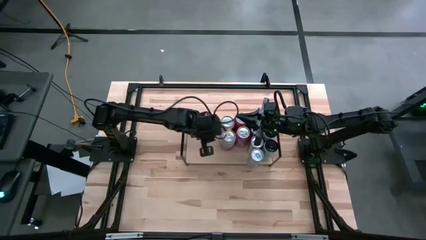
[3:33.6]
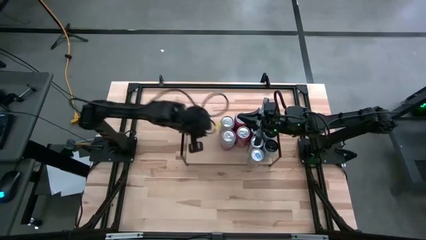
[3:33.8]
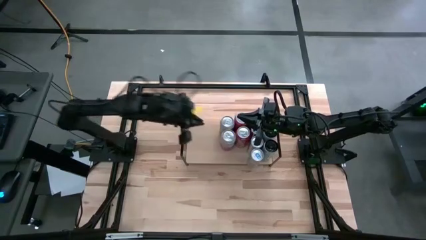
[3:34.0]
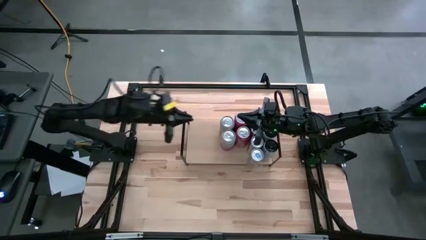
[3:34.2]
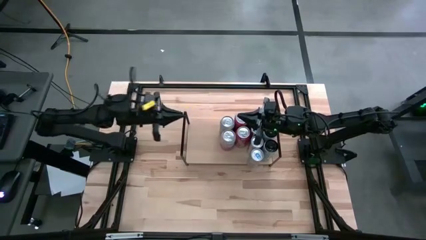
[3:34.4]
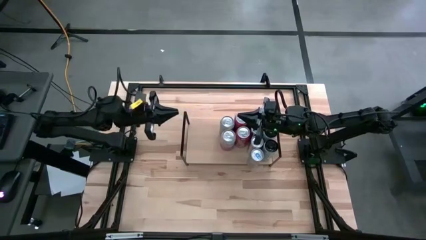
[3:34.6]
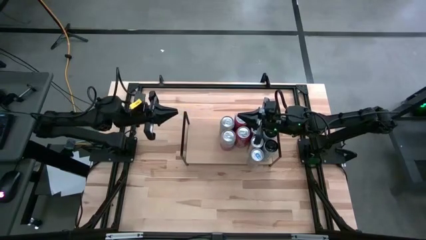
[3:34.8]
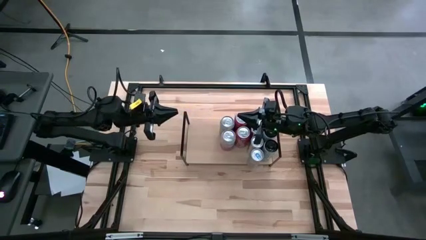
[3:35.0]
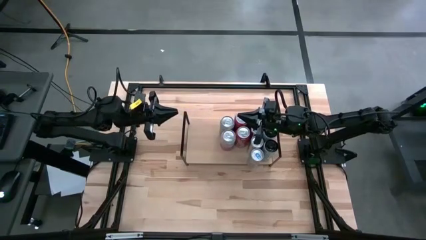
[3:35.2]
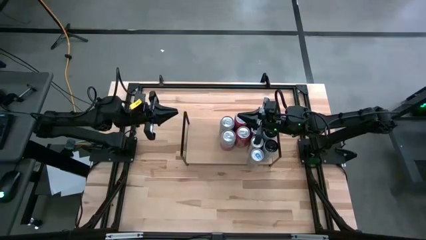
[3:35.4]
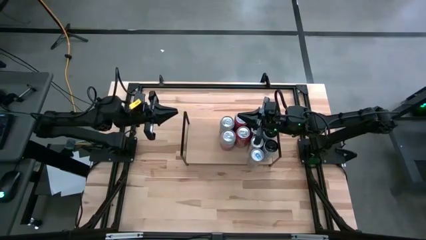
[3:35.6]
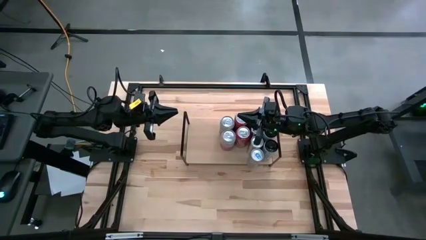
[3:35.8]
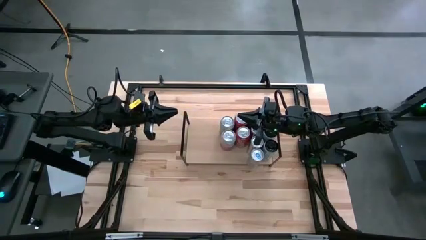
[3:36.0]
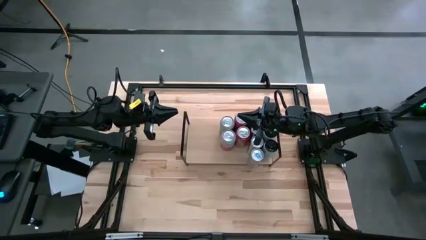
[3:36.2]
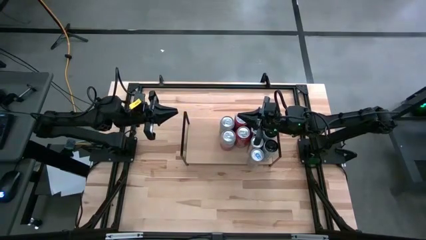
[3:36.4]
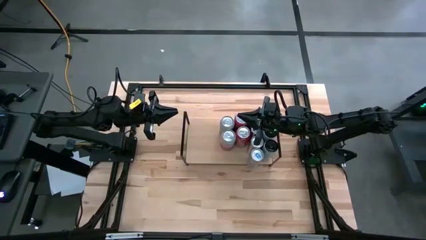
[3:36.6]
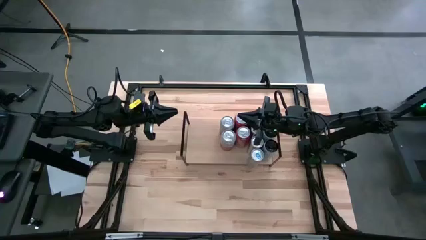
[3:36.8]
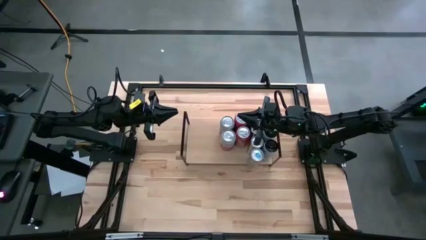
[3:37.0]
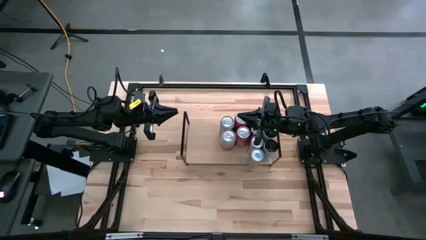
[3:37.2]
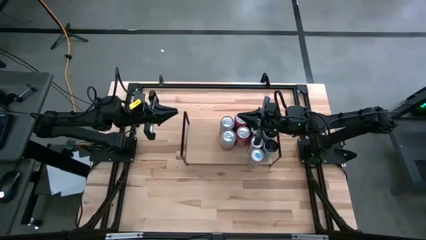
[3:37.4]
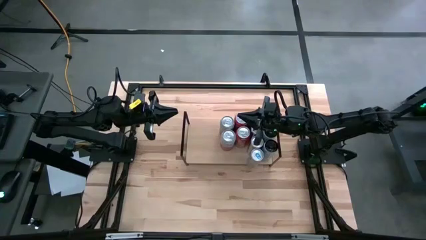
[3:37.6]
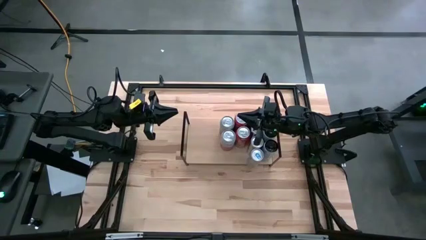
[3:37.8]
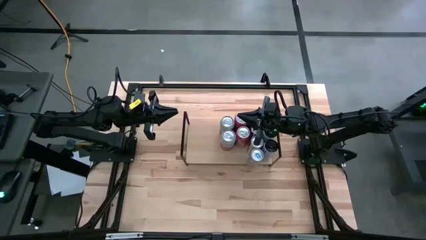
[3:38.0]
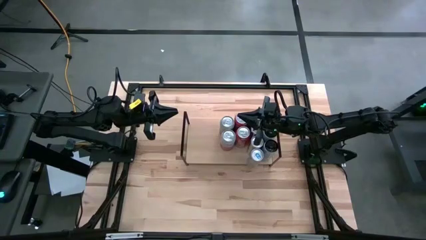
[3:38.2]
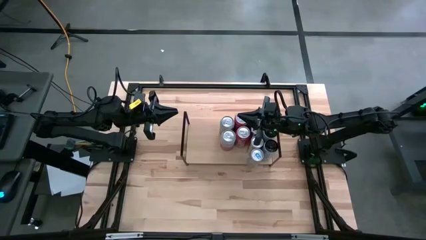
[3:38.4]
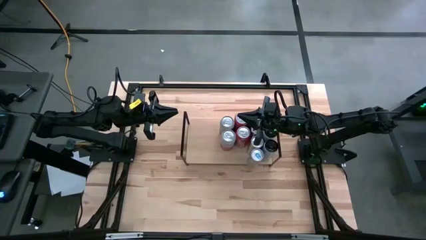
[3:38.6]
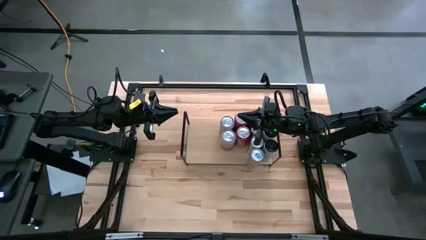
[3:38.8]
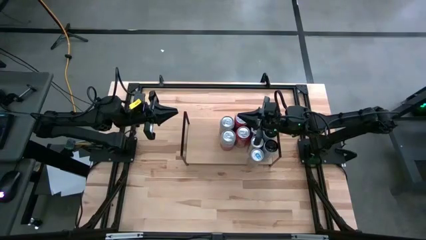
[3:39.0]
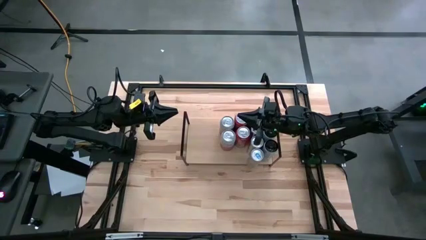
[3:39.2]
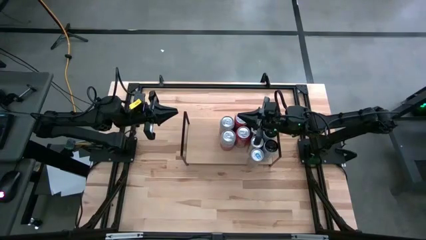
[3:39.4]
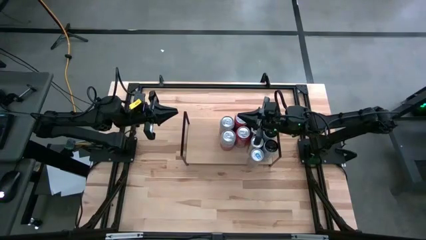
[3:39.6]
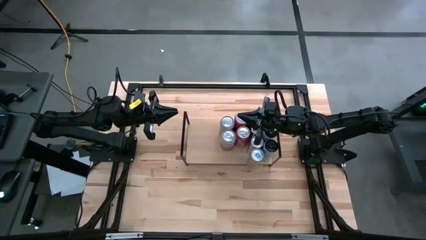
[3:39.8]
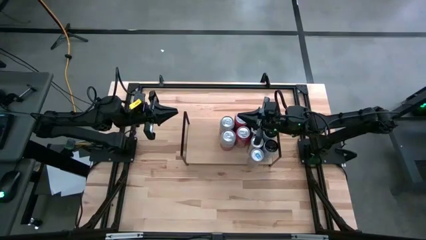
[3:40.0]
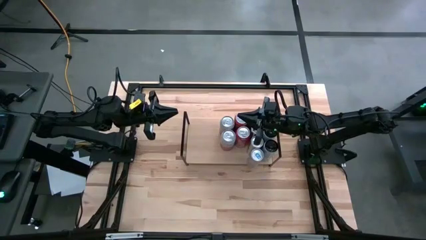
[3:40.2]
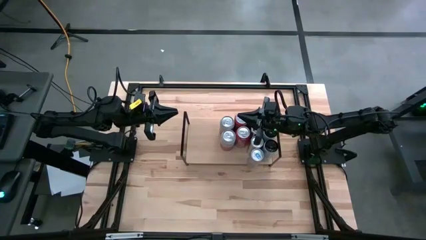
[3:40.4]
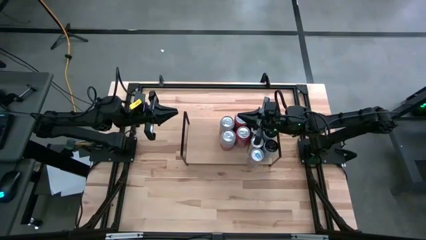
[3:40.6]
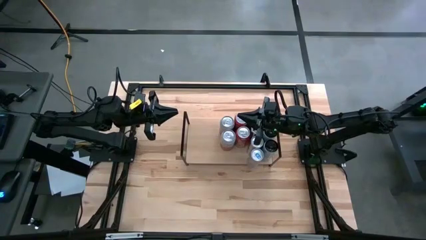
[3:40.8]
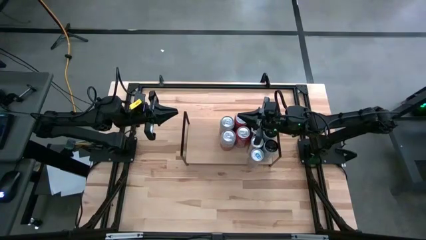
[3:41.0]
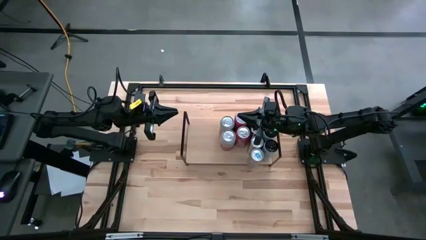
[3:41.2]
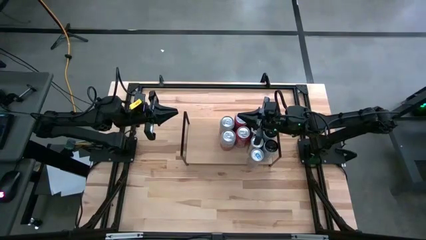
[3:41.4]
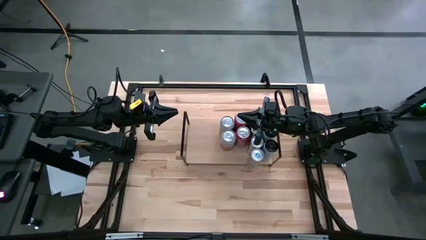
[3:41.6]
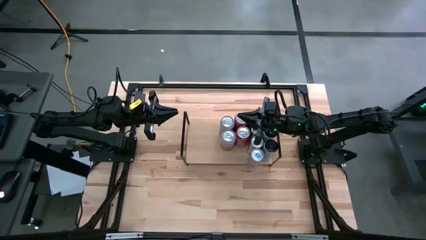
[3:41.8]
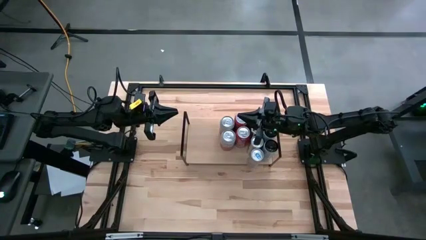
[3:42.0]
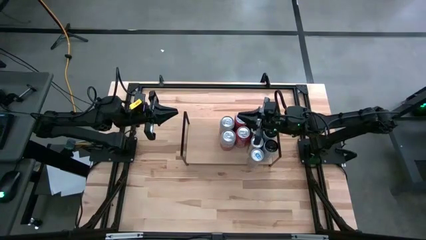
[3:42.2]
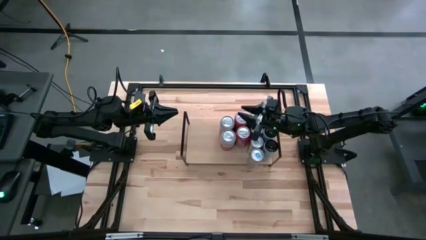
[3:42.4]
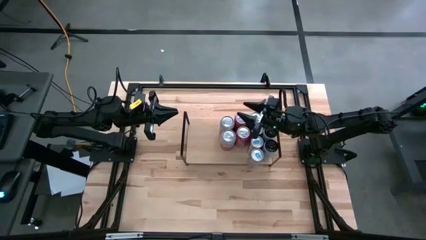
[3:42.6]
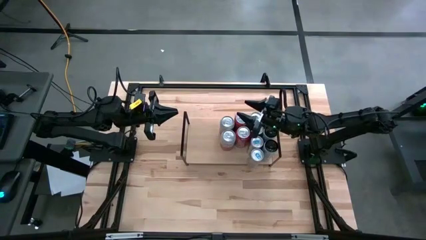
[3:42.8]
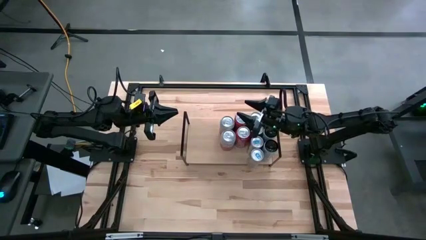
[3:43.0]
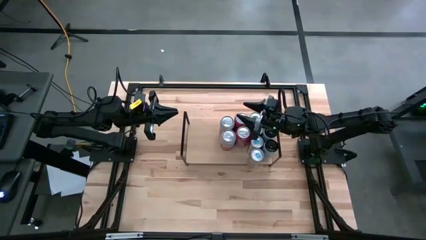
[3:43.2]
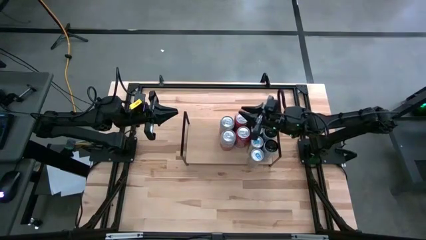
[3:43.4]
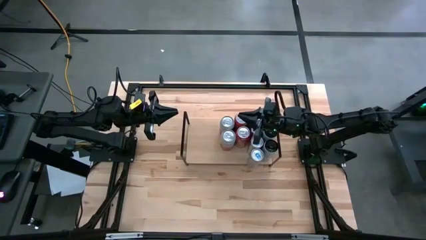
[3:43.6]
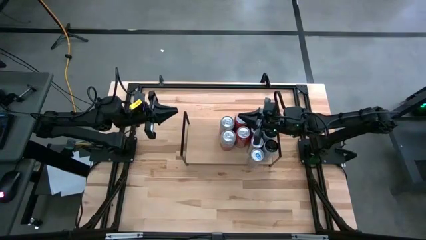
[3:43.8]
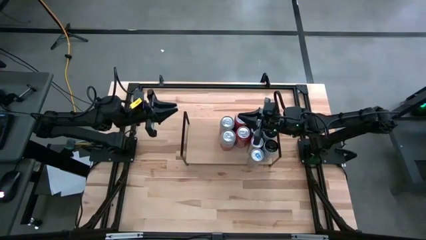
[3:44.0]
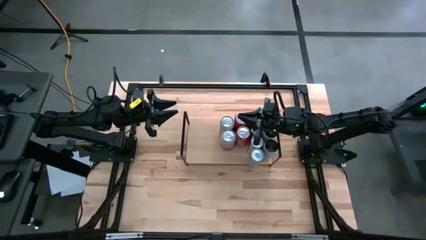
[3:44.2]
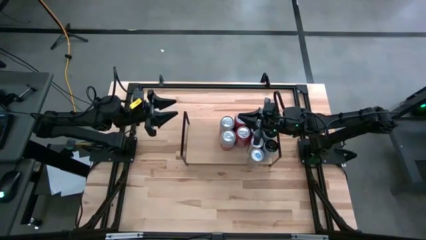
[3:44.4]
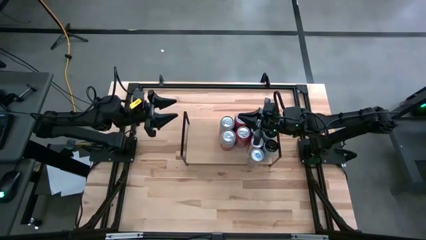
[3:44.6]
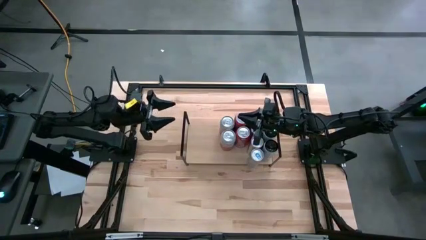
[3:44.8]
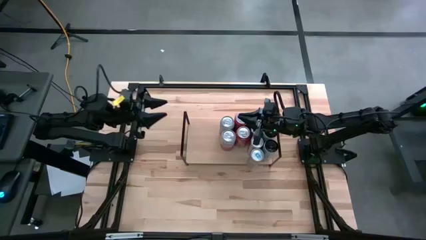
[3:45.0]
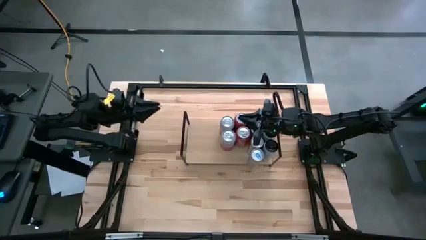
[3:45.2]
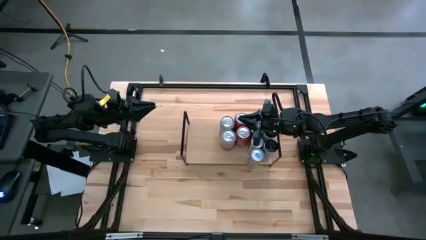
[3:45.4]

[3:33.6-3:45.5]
Task: Place canned beverage on shelf
Return to Home Position

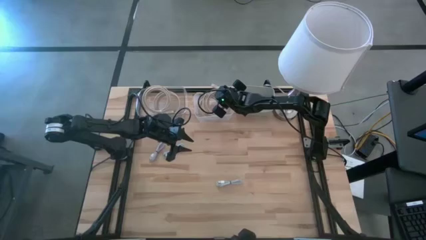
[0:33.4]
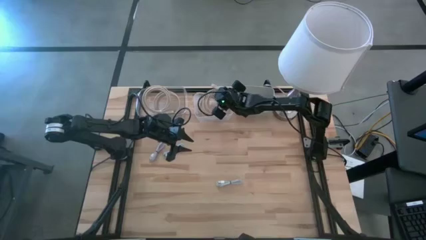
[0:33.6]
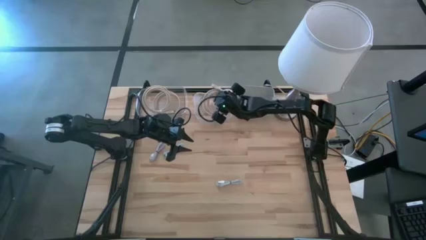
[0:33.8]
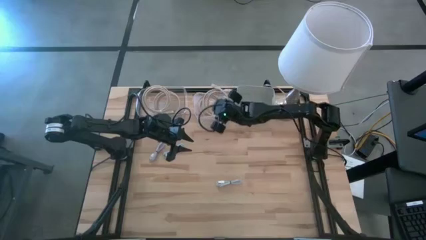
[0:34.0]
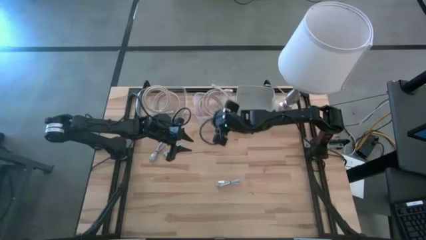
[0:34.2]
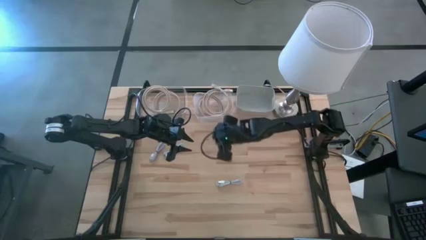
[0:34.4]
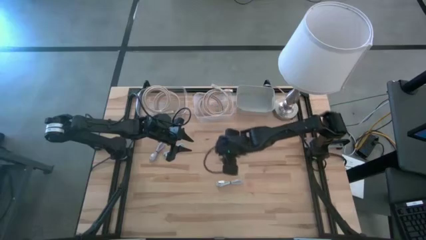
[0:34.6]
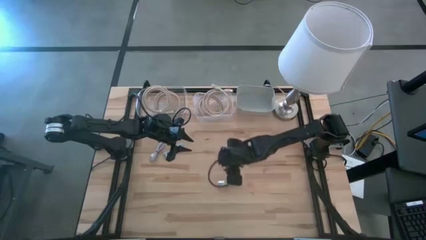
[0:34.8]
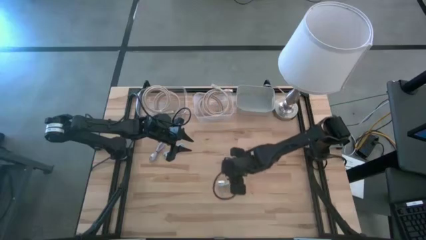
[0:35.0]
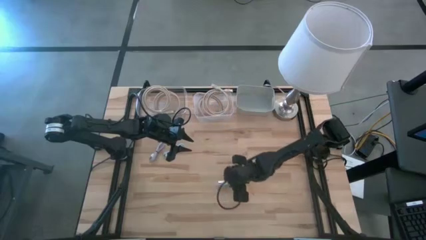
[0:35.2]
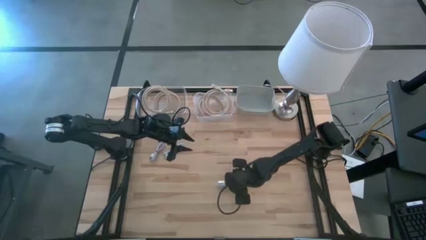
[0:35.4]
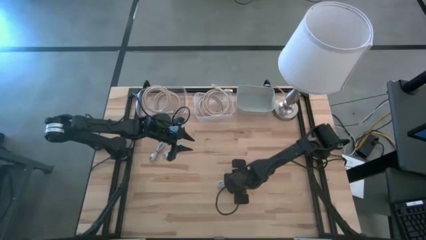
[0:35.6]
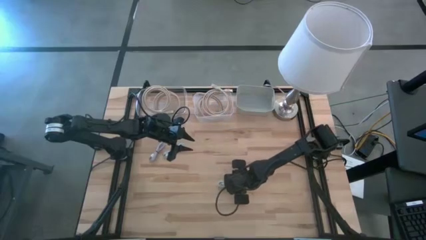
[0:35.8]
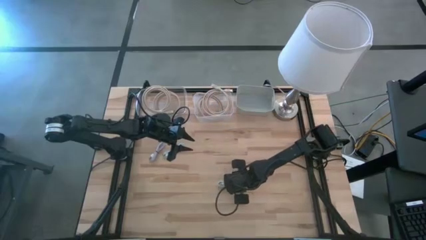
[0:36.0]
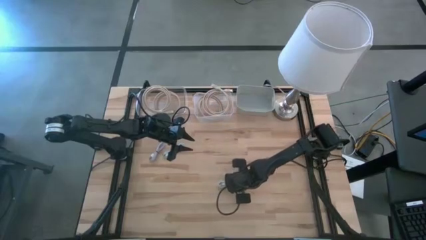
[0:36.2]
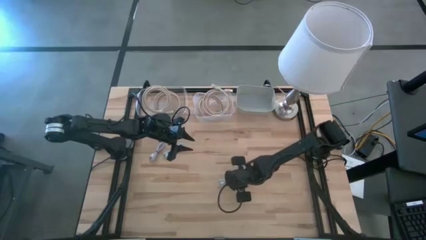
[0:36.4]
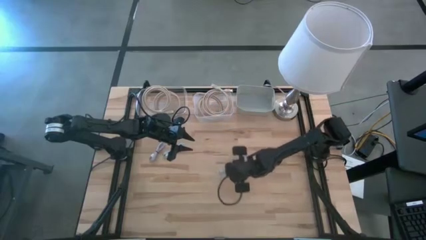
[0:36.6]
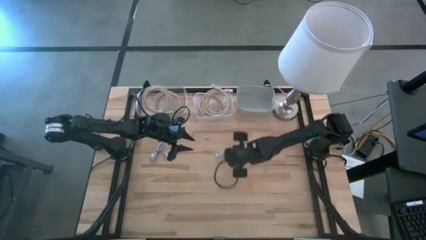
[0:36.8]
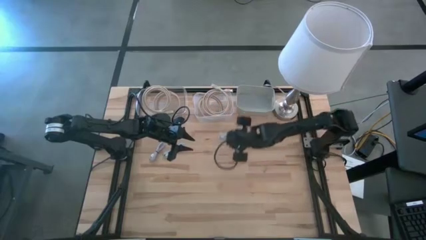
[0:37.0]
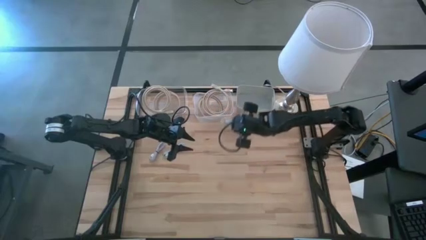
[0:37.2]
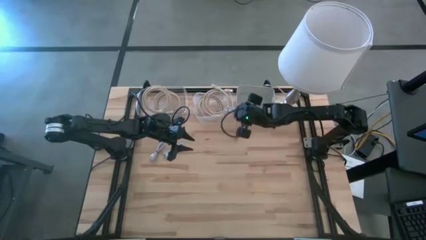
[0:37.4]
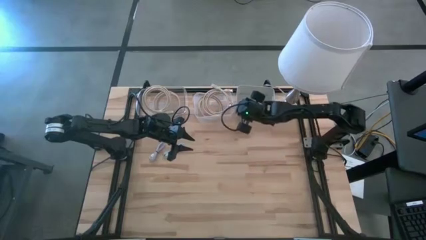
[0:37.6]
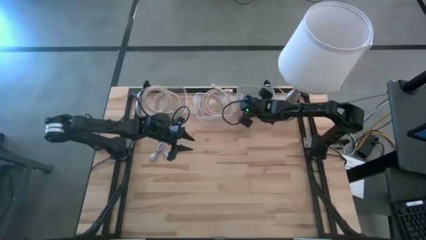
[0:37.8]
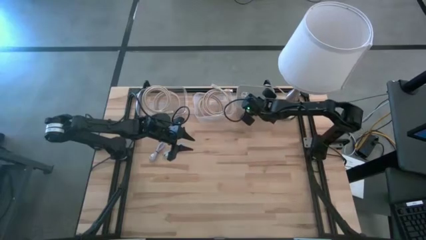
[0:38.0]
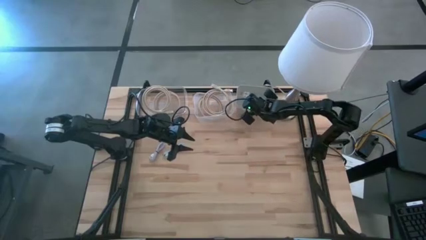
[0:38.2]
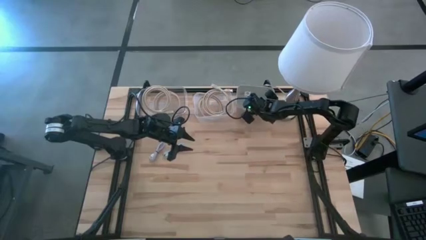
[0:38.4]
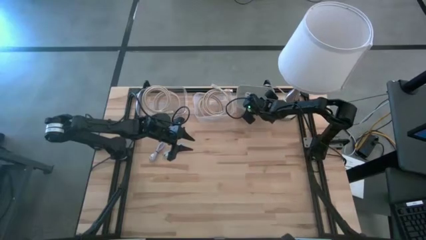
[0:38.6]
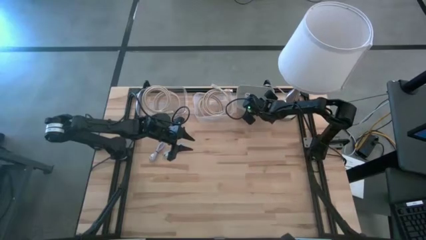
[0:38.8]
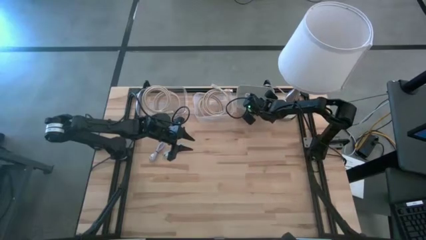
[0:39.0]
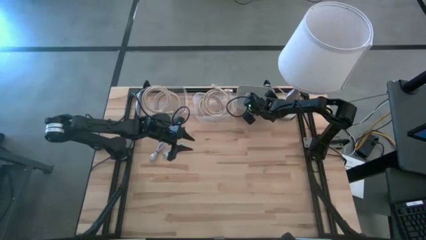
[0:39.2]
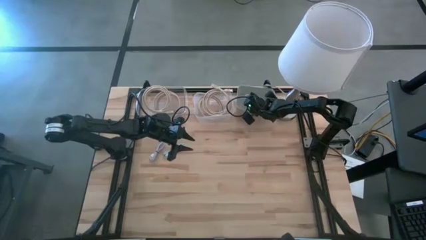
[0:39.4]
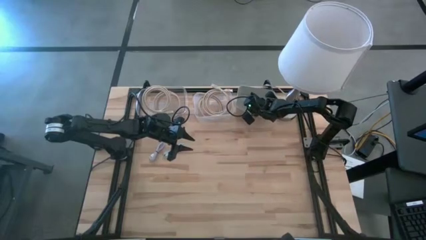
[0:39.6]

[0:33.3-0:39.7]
Task: Pick & Place USB Port
Put the white USB cable into the gray bin
